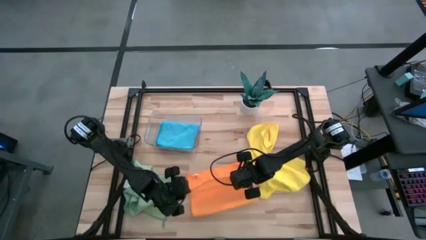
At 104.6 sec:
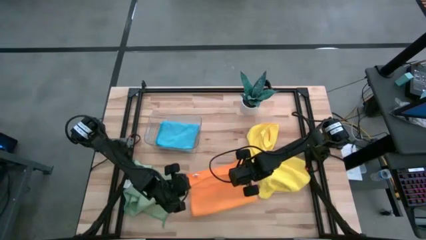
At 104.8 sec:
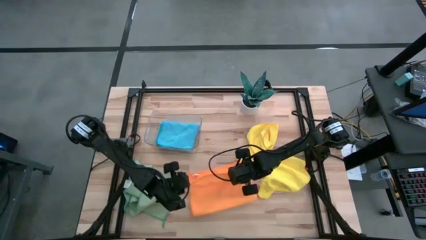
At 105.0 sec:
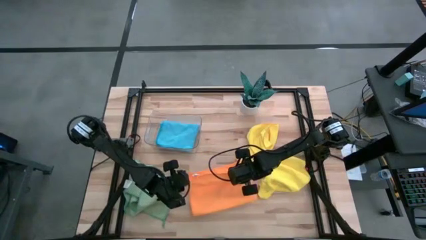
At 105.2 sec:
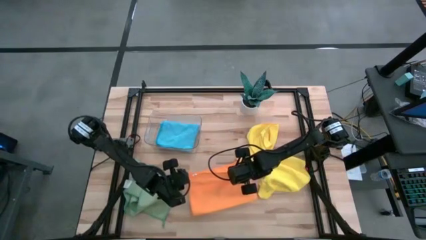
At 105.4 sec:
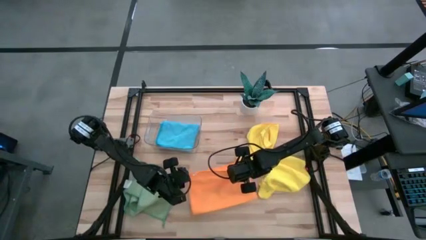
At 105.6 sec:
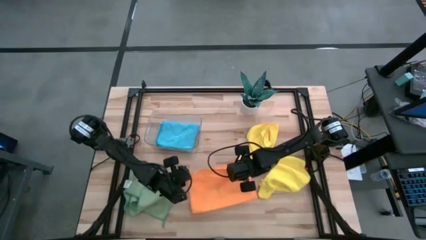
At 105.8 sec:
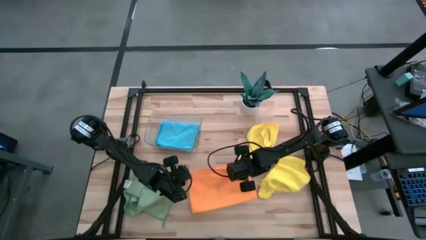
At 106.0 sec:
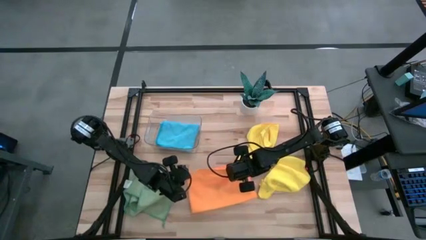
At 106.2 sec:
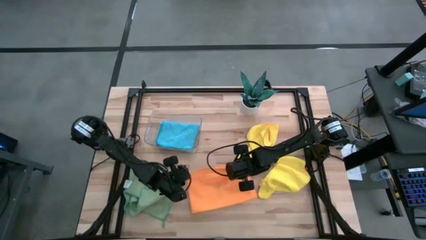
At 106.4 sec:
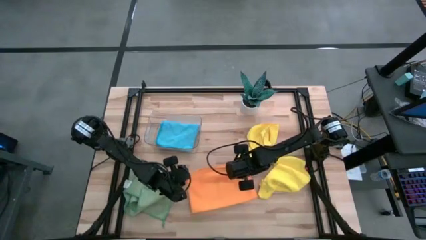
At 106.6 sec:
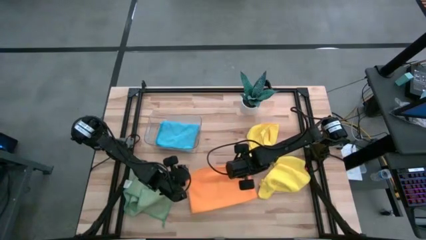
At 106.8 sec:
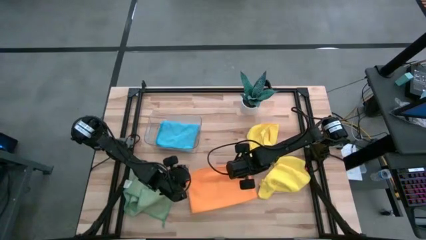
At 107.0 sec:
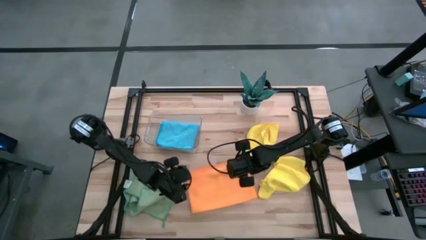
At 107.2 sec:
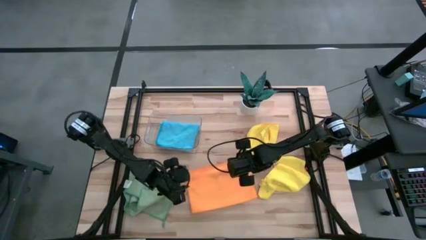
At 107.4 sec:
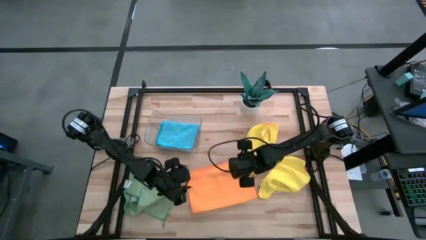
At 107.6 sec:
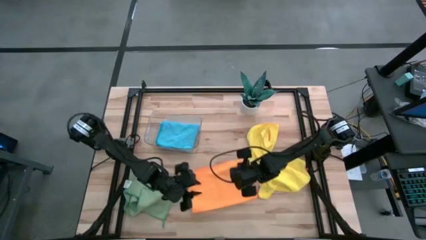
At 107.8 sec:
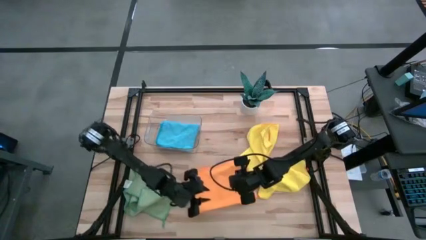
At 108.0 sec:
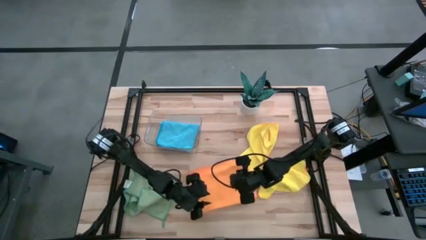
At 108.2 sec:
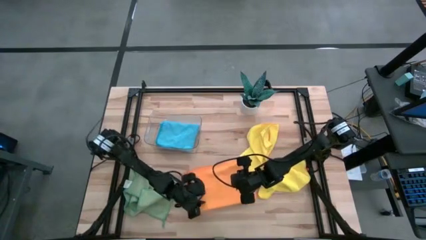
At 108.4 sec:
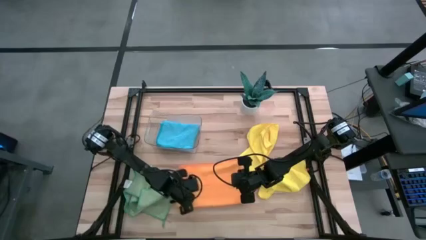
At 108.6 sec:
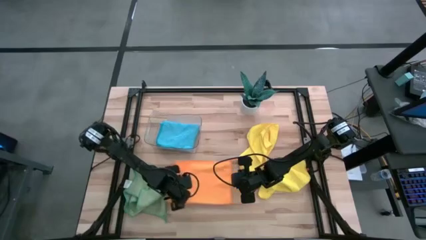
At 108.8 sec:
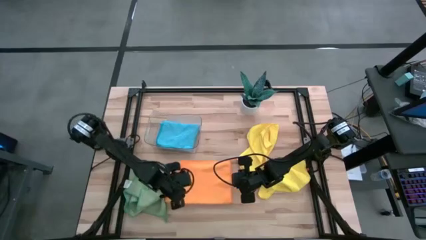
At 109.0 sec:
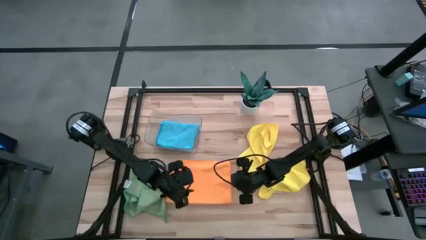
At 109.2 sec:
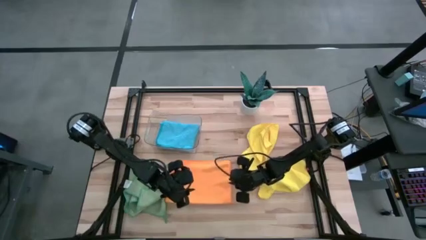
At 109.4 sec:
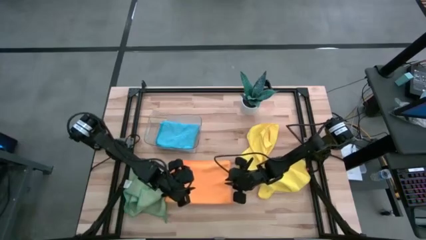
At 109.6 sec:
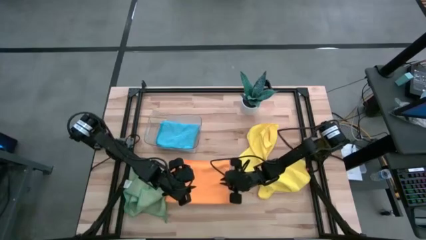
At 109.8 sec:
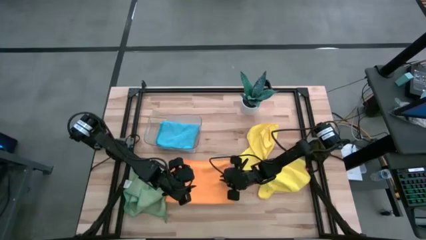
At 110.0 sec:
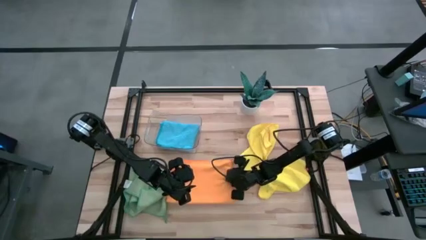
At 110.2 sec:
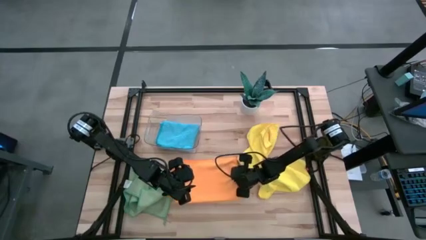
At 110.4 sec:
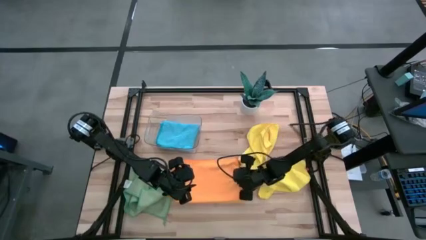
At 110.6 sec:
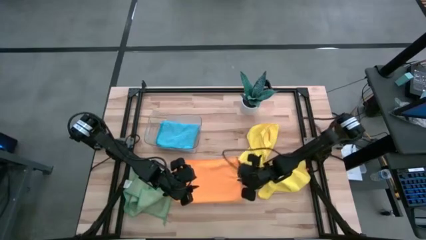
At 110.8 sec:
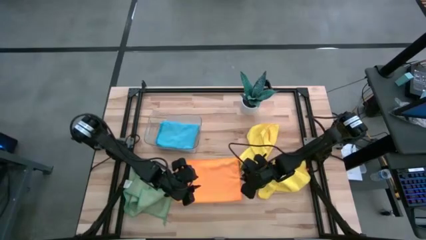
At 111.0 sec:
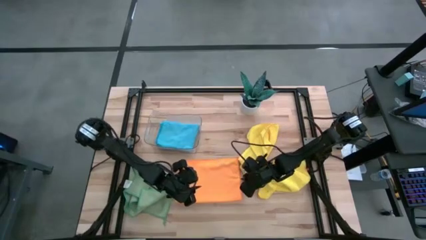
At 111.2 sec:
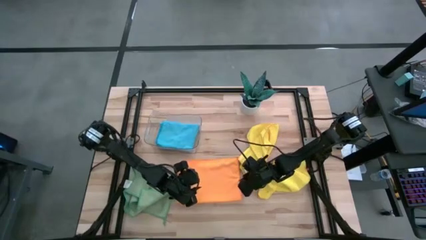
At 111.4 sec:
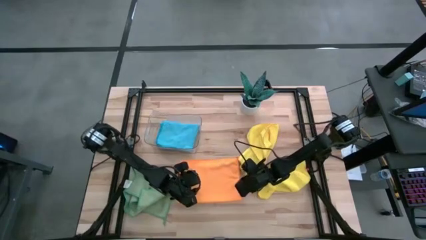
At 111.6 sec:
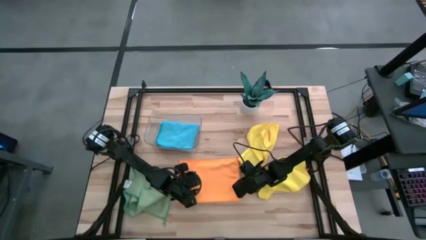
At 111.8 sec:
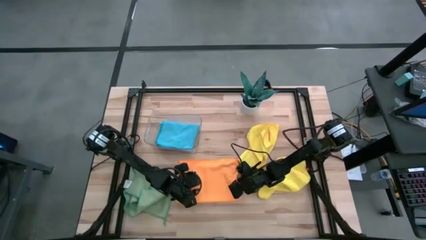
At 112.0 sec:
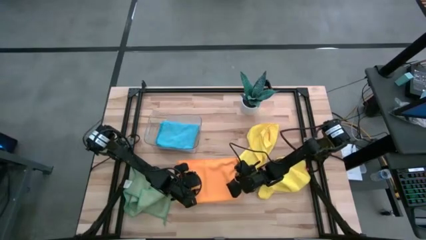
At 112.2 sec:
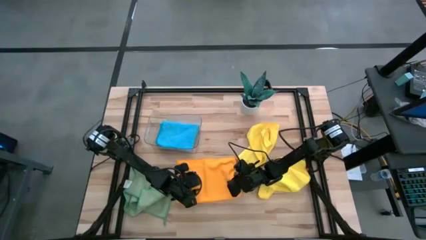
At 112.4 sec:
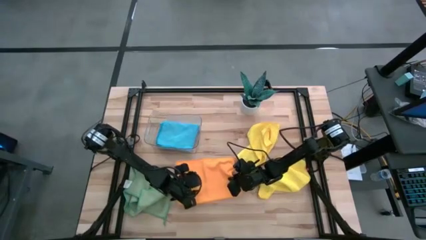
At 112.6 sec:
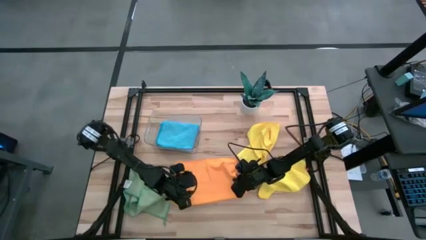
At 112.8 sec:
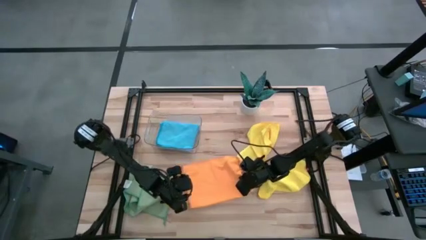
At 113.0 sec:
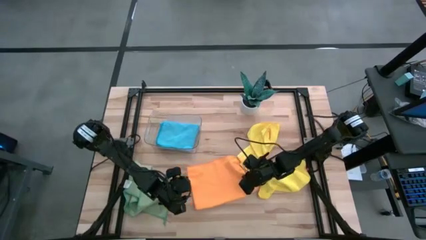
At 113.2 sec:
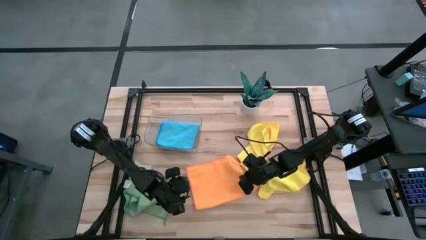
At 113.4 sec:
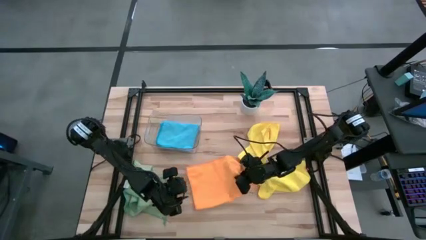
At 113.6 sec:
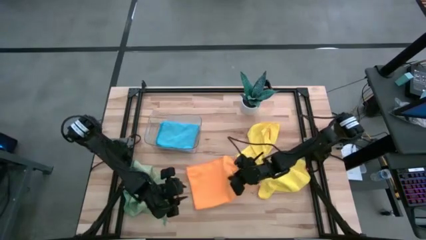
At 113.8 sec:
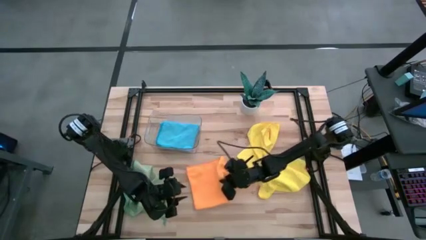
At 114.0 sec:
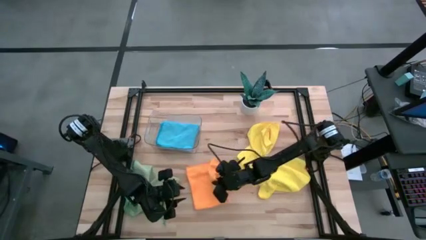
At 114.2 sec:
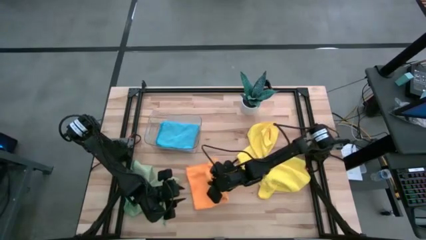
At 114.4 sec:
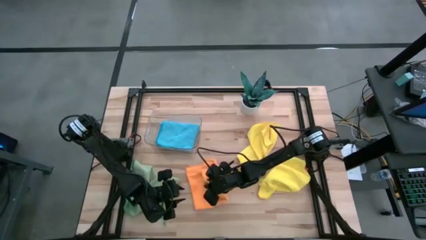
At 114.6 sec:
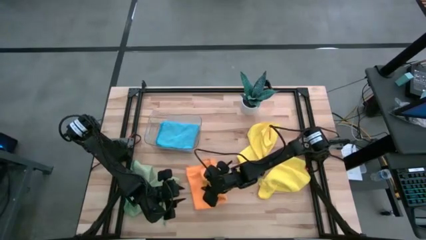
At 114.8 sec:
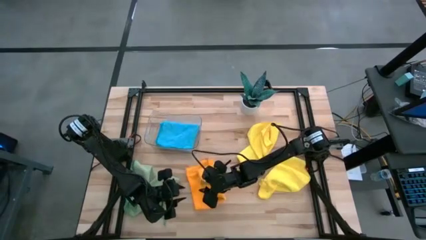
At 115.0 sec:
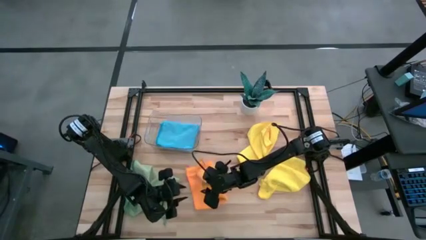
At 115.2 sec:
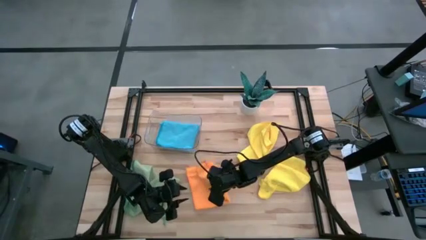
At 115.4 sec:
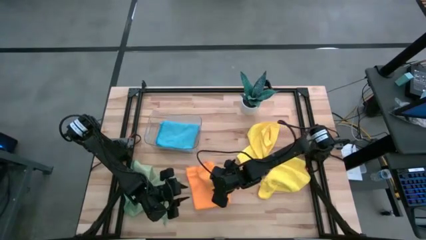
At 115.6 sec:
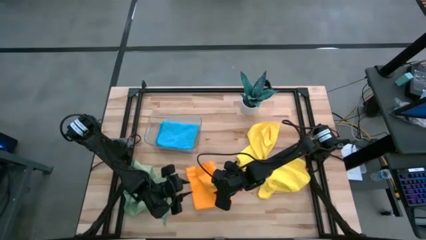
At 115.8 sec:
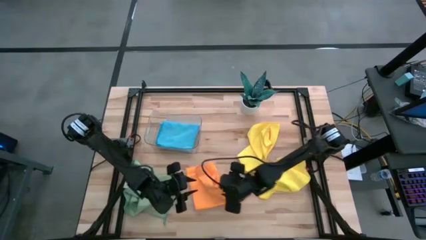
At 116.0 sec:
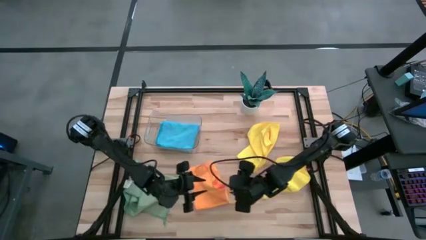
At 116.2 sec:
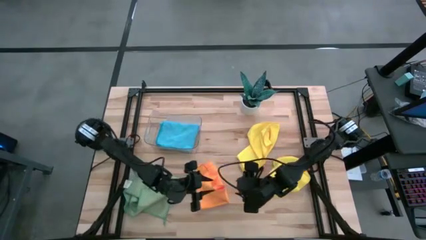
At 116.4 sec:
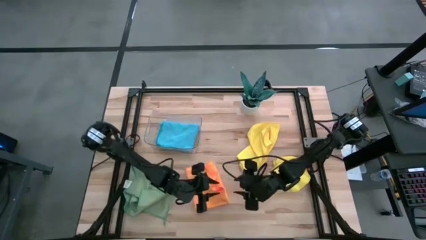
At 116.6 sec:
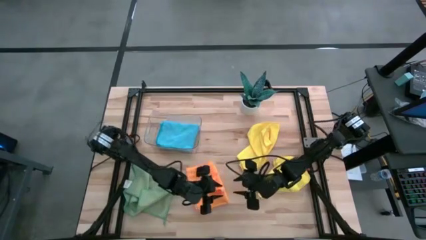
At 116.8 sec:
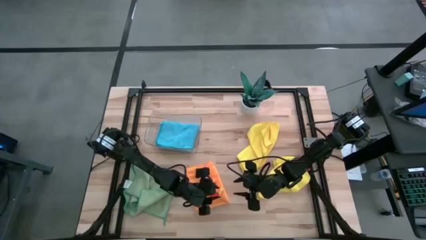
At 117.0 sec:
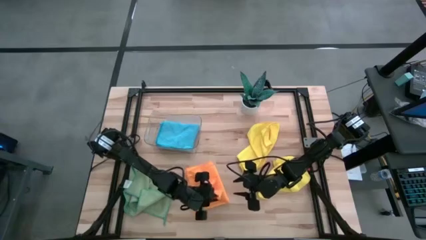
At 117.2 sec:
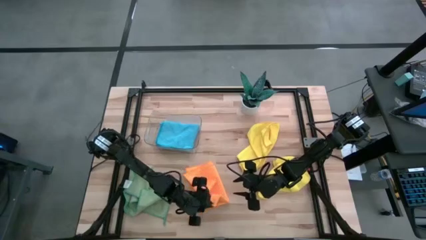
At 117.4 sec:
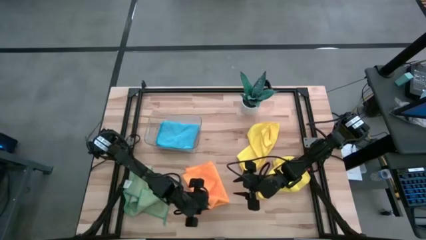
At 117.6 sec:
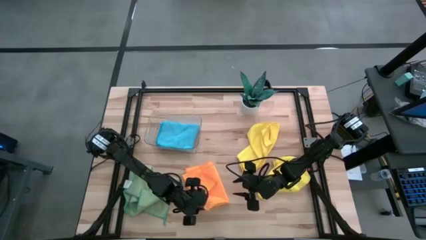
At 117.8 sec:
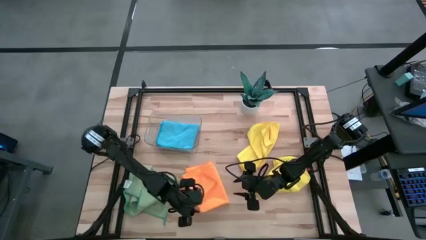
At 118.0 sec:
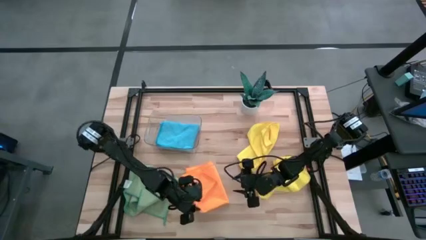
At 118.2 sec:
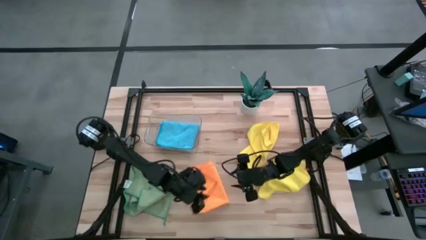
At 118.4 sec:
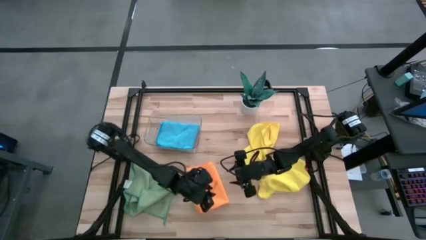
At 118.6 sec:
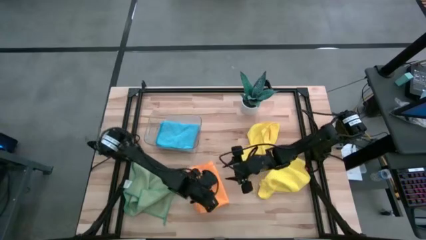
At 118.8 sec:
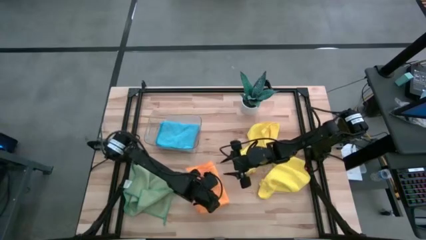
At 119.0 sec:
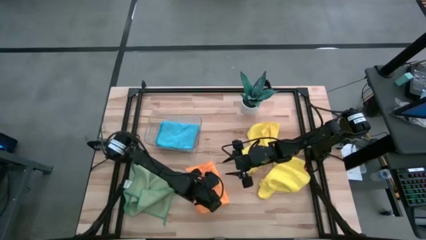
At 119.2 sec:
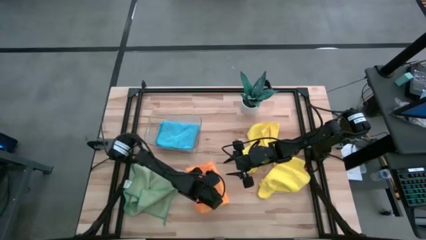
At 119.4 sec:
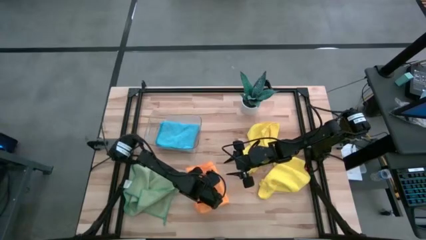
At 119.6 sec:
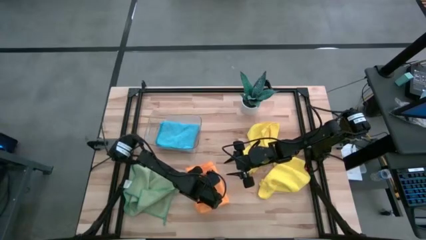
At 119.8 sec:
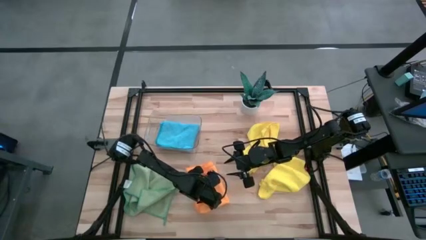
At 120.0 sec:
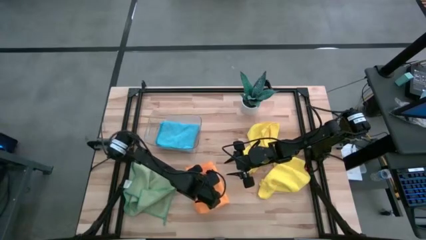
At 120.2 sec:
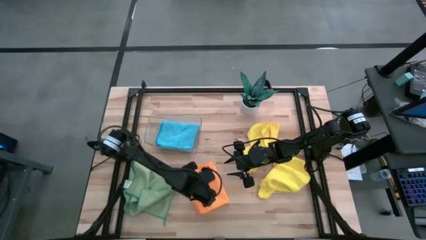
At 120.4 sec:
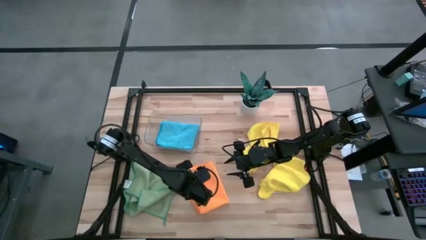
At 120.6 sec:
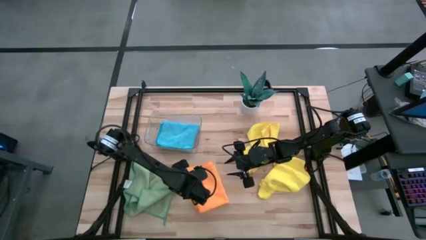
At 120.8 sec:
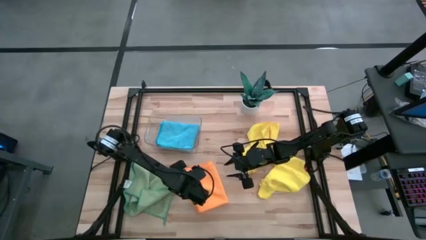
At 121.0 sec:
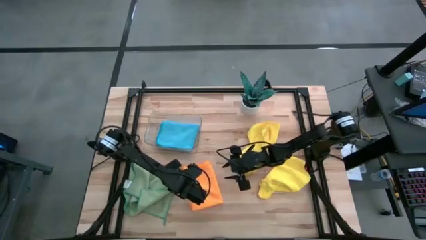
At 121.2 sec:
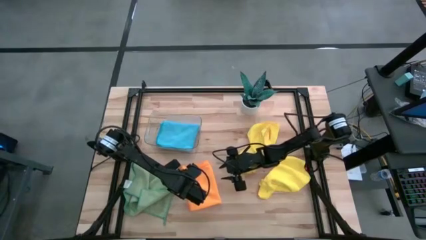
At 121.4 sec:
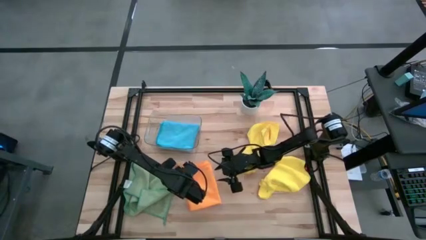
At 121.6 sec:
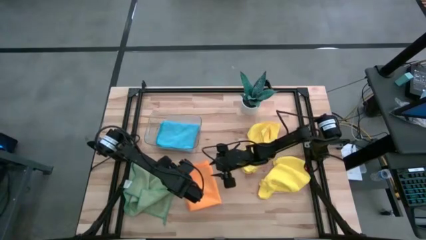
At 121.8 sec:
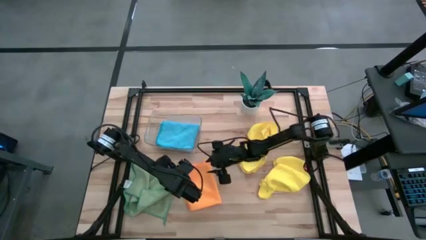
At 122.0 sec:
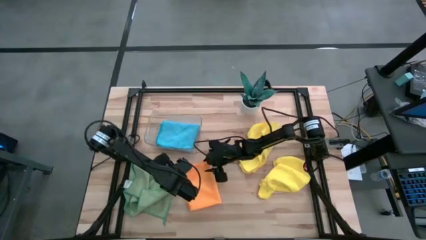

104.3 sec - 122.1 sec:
Task: Fold microfiber towels
Fold the orange microfiber cloth
